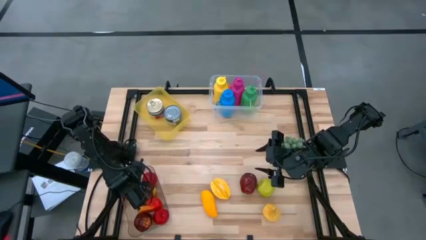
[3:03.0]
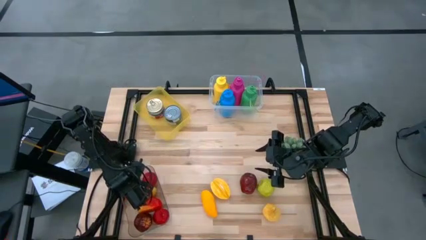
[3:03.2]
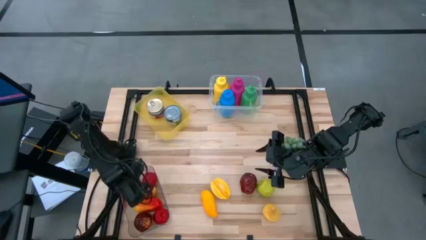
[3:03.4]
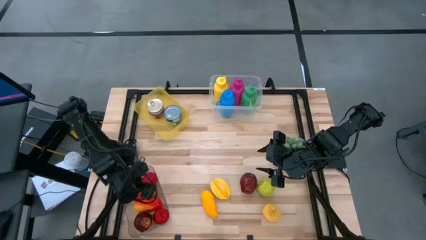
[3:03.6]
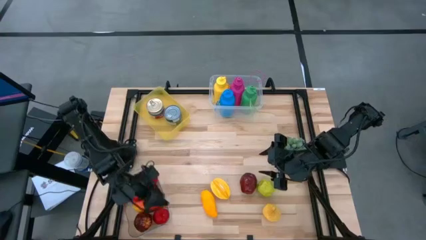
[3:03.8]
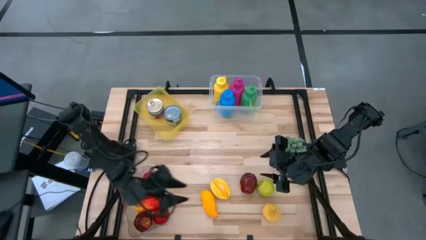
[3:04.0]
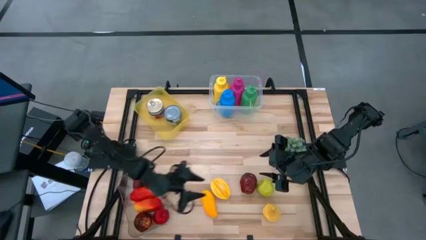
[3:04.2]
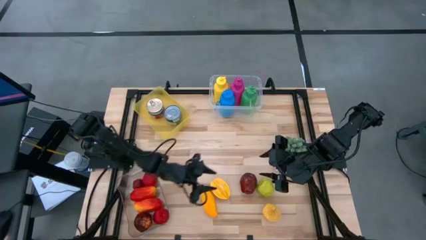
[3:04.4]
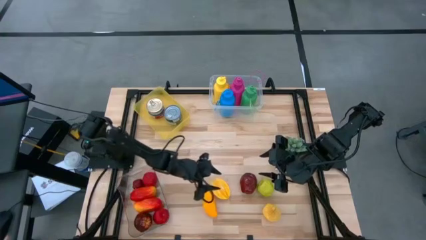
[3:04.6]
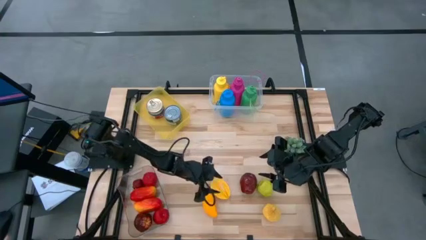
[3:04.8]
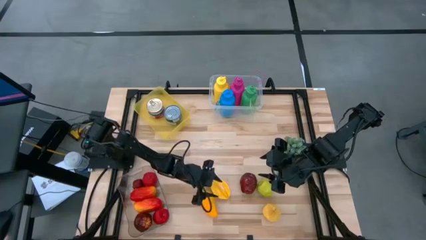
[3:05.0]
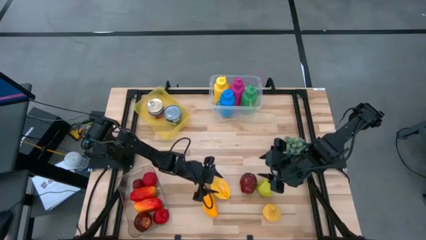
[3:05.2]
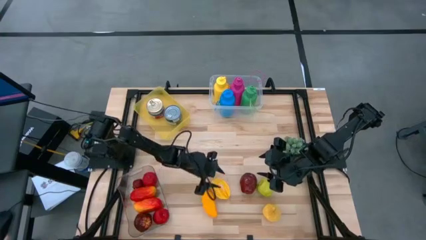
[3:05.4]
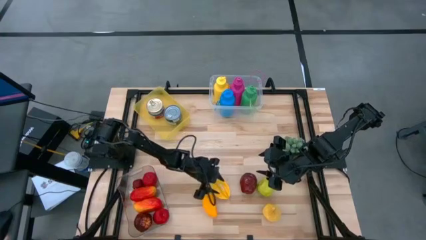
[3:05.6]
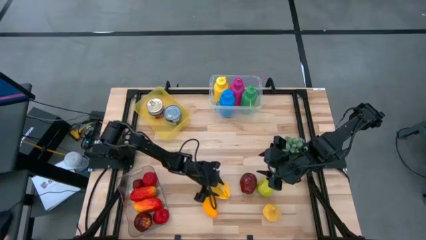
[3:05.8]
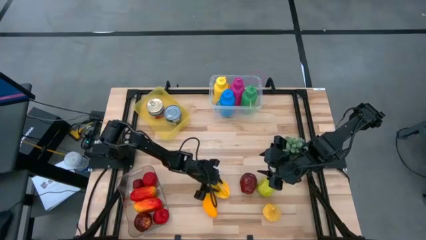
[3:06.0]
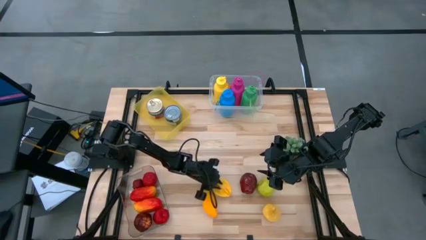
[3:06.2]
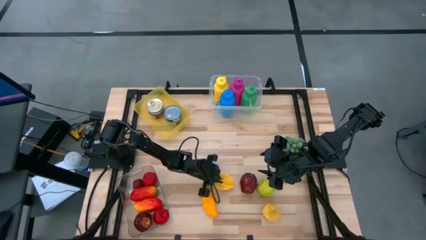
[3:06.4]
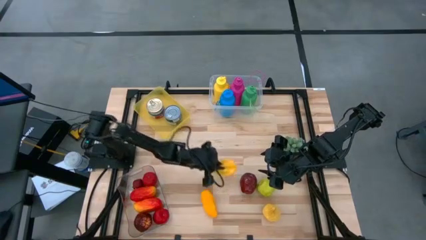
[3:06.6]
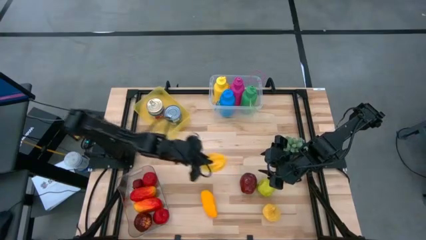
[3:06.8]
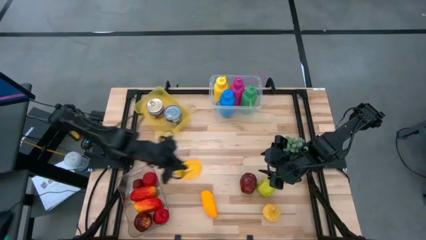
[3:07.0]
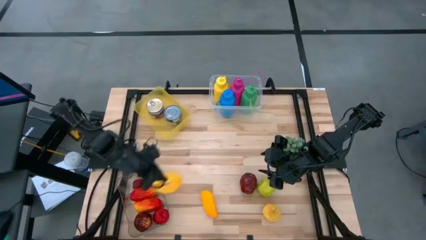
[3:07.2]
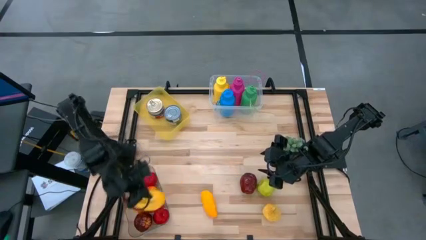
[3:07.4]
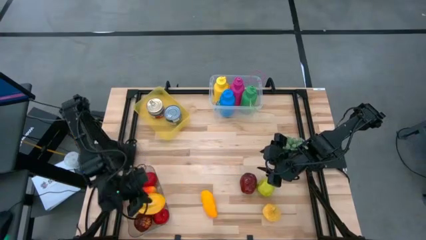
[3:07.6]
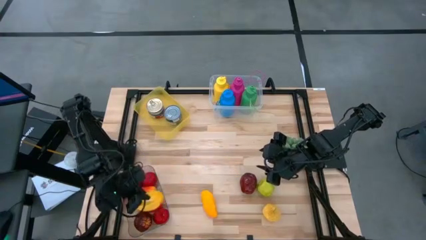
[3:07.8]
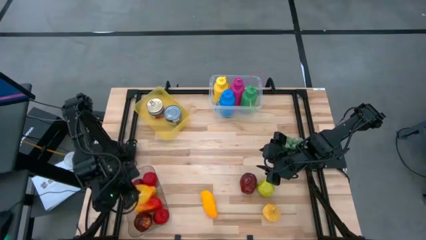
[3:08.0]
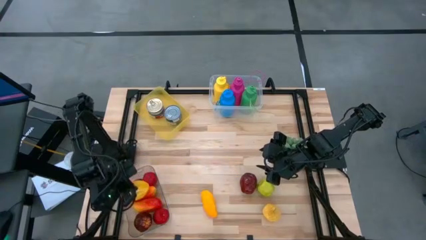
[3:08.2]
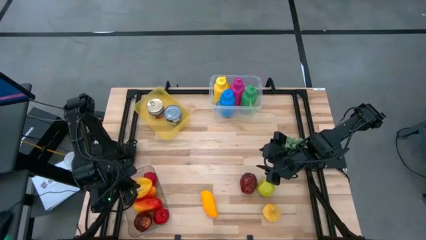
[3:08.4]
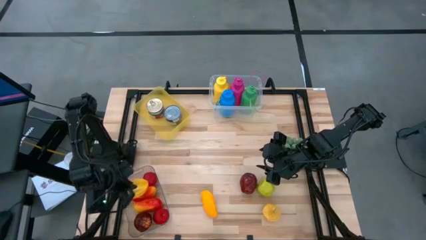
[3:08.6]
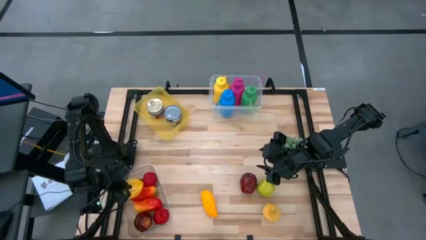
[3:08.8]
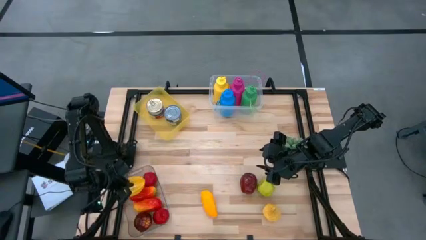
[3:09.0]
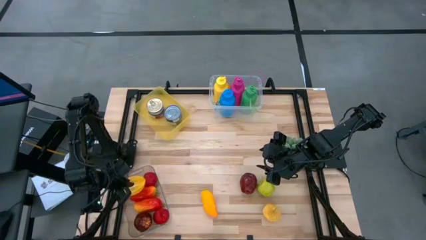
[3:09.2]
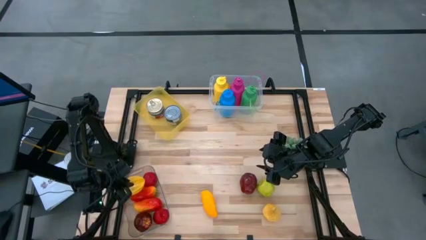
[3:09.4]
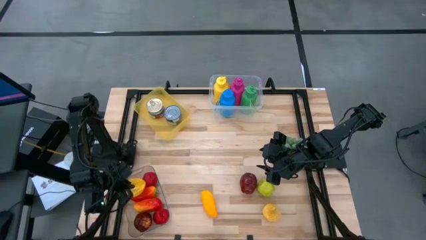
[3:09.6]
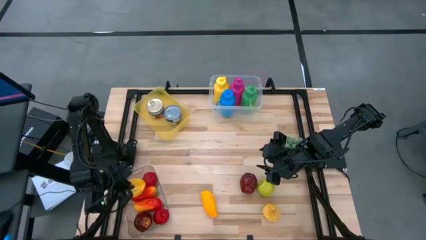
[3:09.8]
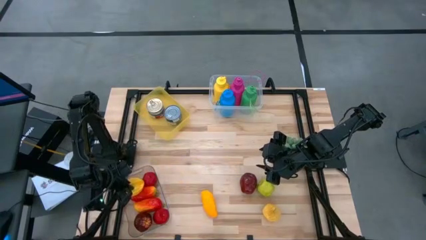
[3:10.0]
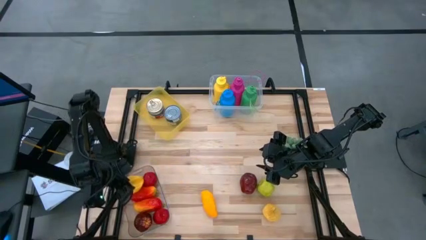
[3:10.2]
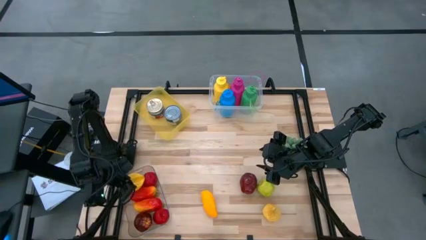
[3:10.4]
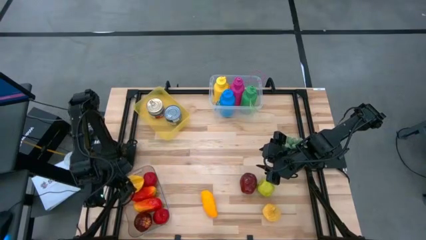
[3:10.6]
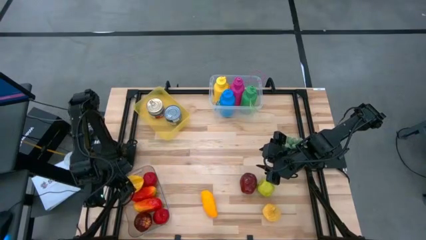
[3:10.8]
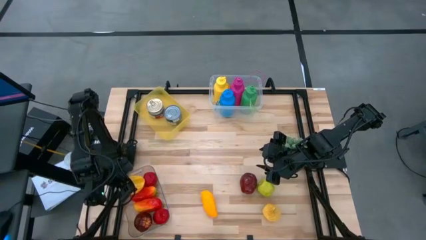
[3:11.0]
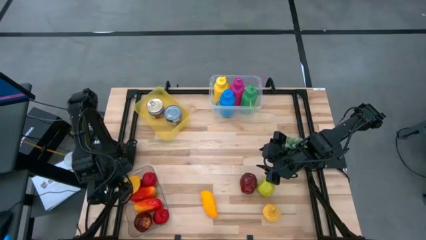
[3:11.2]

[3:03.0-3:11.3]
Task: Pick & Place Food Item
Put the yellow starfruit into the transparent bin

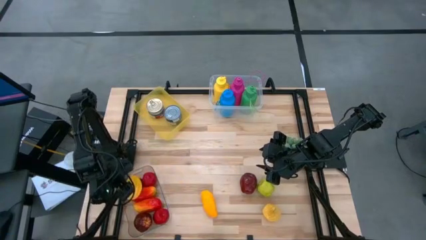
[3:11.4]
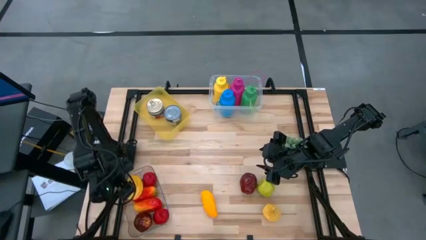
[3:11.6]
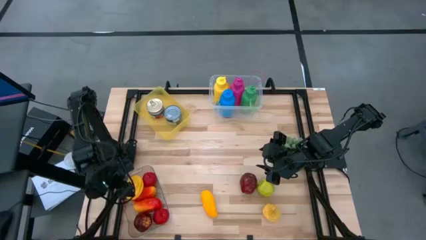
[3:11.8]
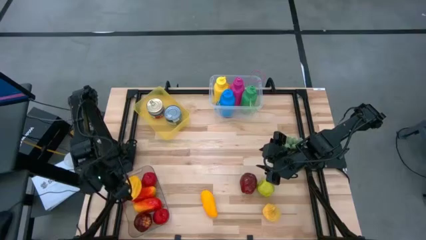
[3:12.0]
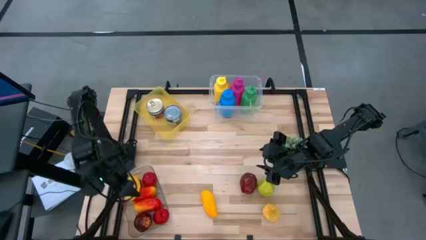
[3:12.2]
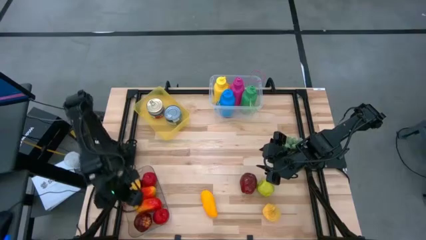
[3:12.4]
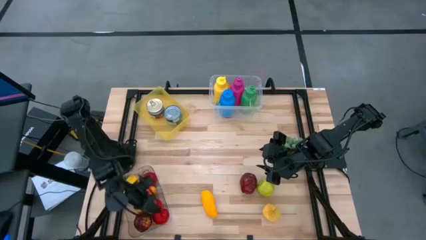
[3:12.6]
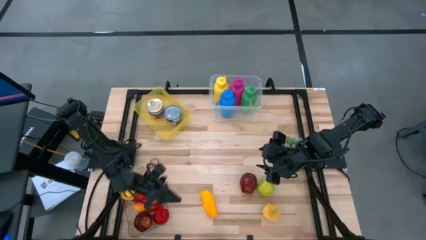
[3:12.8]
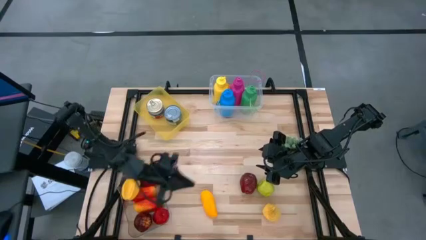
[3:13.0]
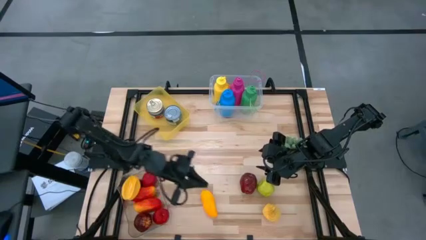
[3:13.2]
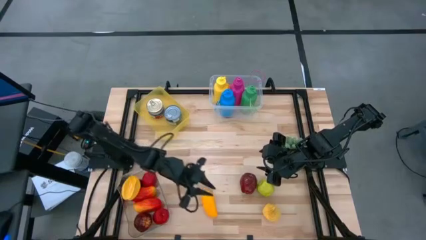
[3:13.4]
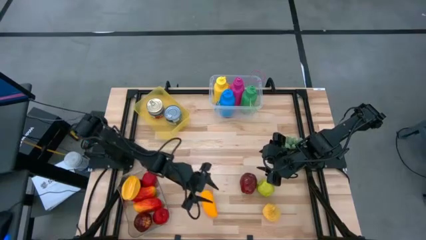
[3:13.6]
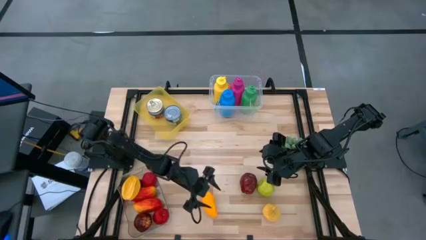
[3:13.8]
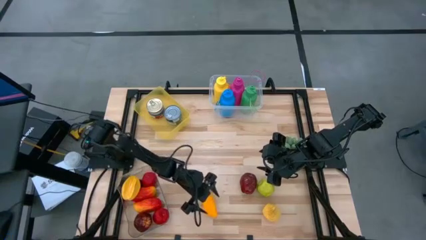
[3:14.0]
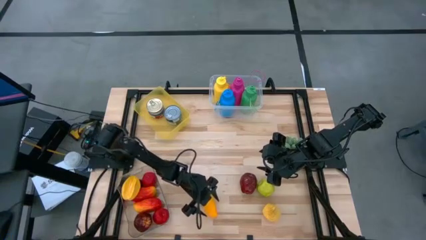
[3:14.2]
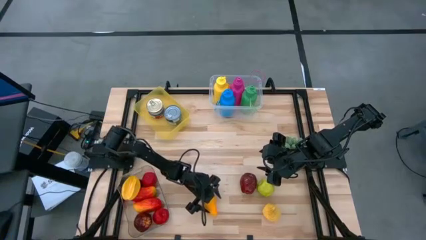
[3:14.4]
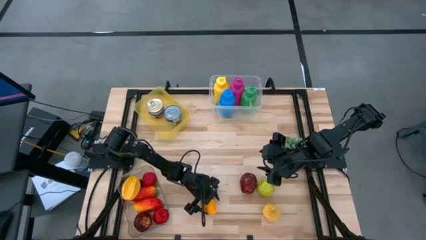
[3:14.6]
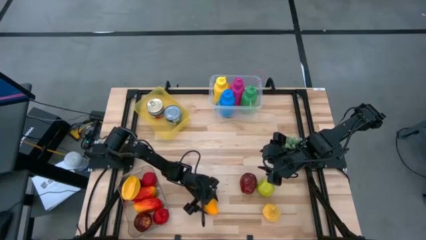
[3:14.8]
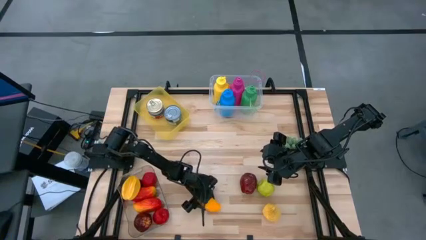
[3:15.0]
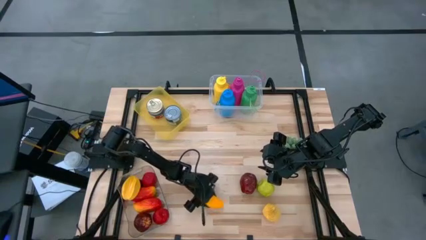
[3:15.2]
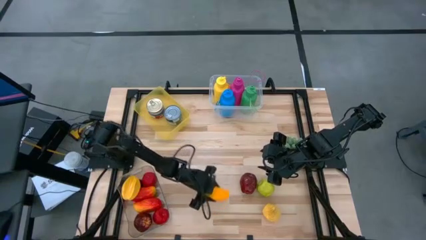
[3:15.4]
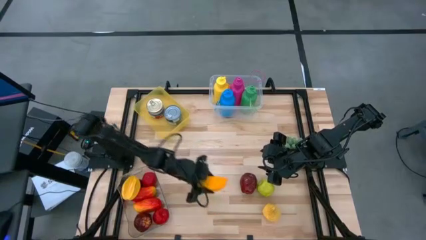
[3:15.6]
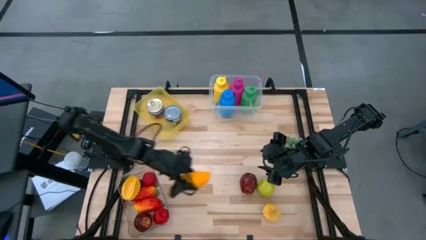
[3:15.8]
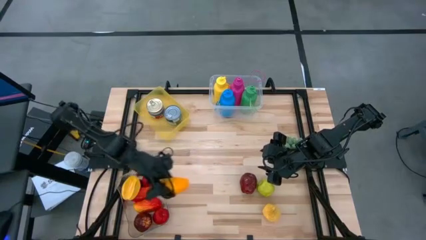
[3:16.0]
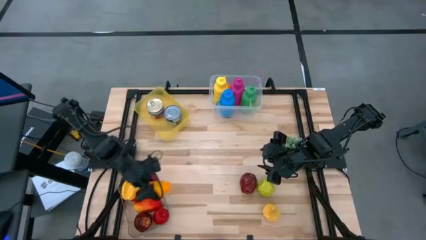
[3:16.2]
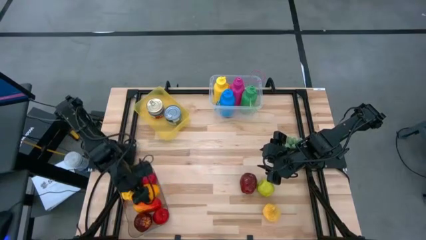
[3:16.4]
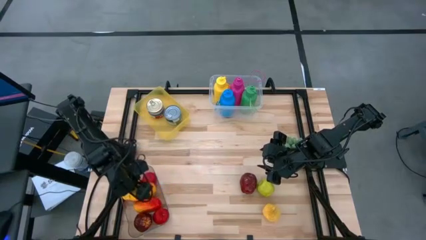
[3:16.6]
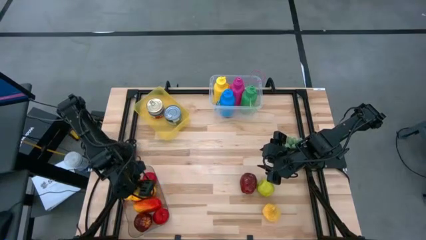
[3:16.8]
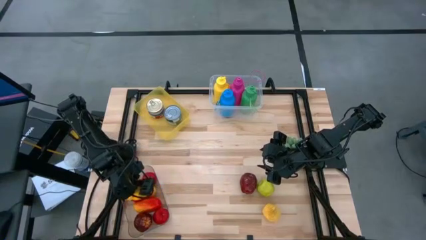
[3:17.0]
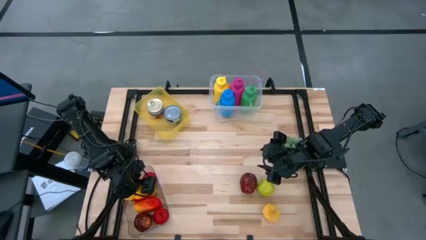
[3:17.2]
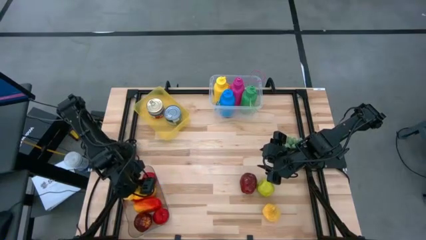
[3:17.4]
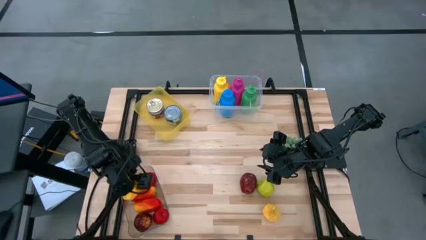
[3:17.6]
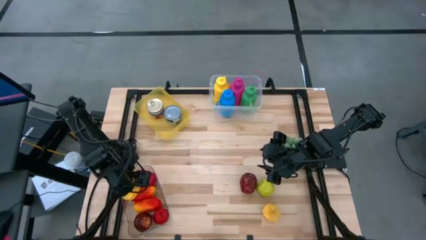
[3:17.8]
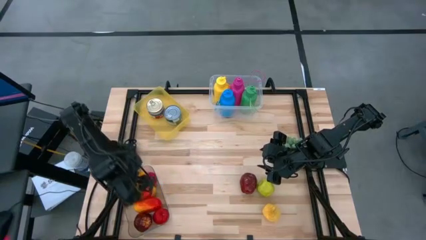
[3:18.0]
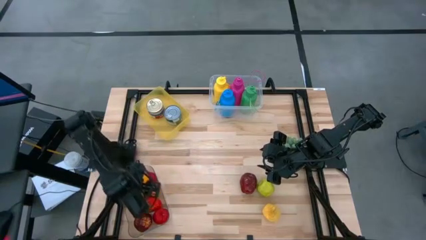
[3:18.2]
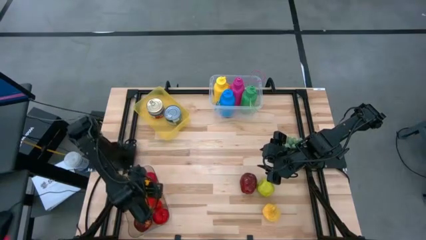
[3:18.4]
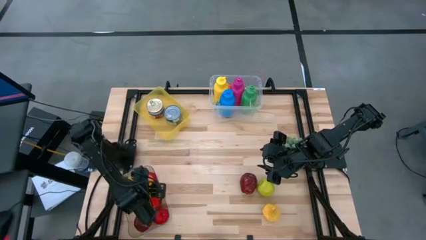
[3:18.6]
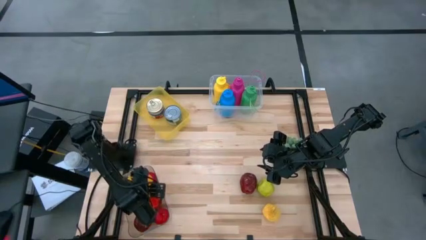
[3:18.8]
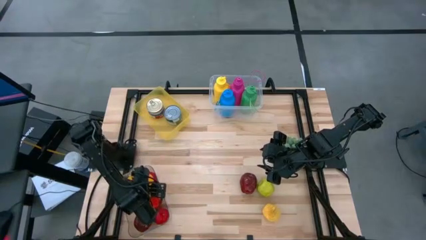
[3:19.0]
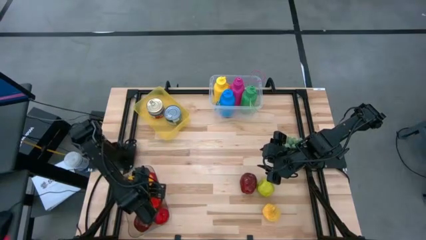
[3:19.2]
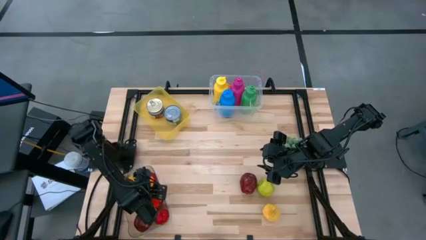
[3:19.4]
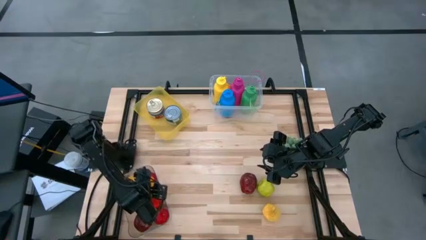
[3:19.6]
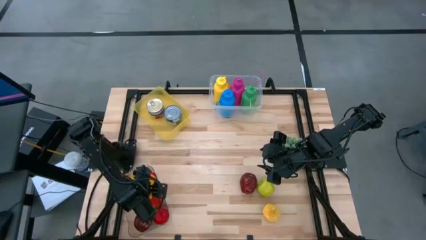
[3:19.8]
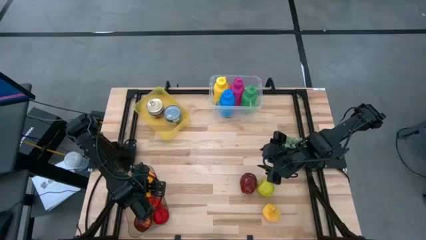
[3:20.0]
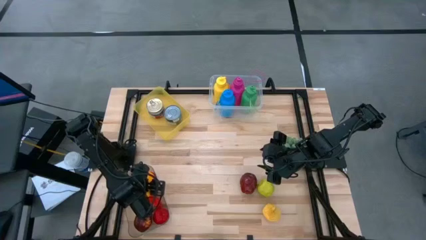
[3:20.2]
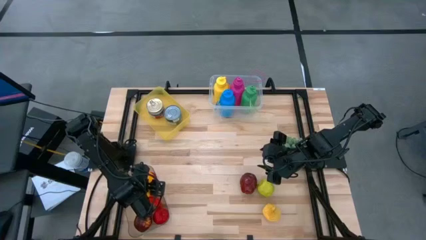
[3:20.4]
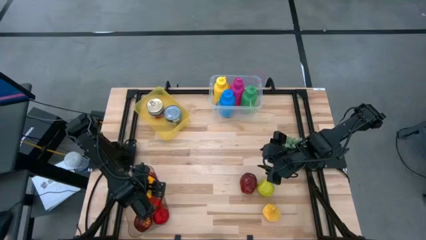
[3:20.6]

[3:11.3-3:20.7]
Put the yellow mango into the transparent bin
